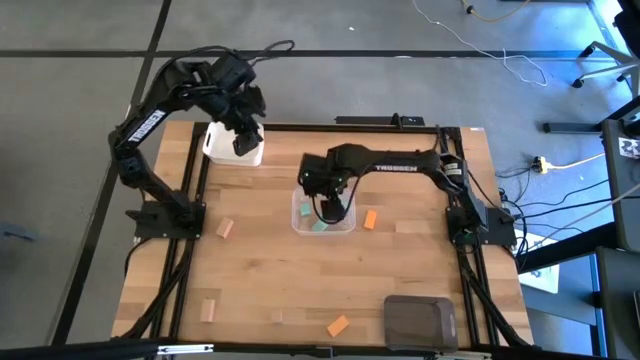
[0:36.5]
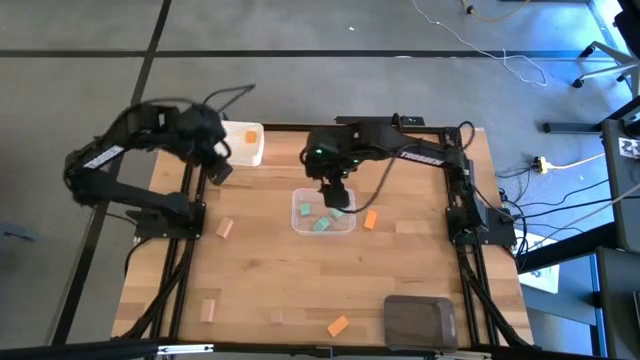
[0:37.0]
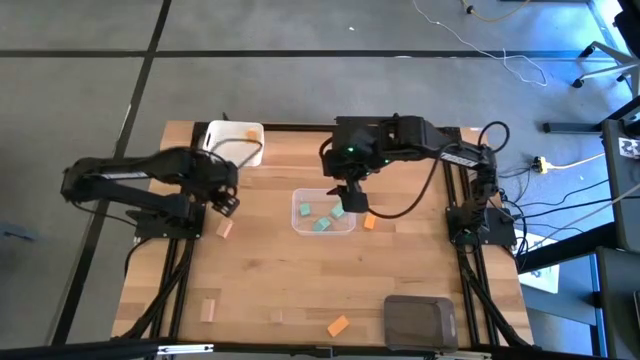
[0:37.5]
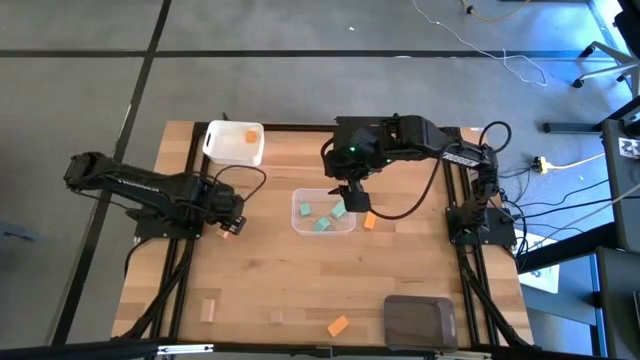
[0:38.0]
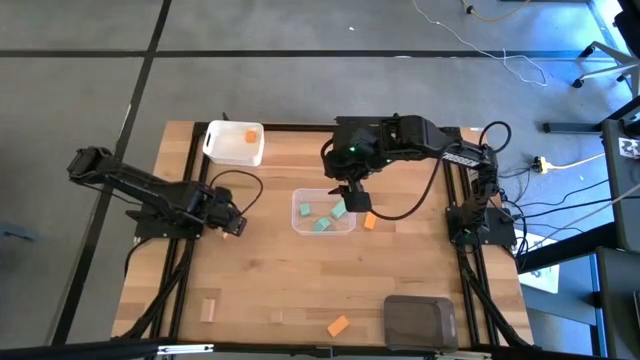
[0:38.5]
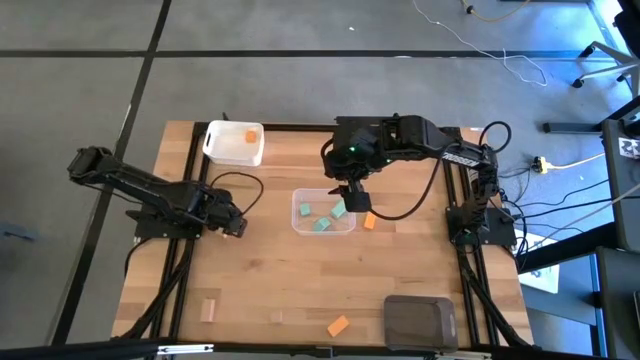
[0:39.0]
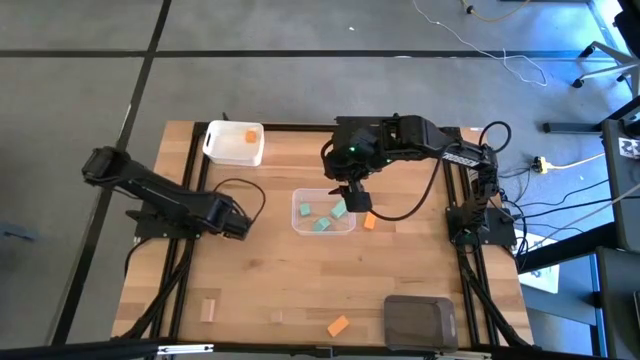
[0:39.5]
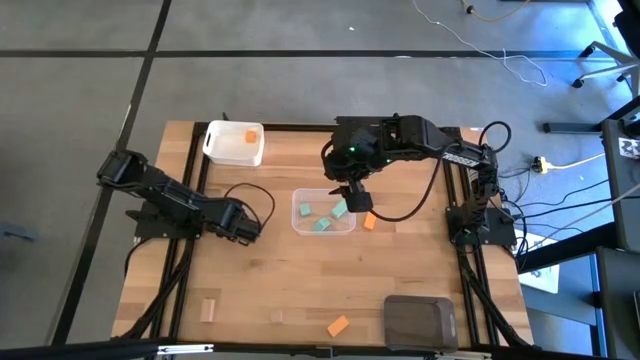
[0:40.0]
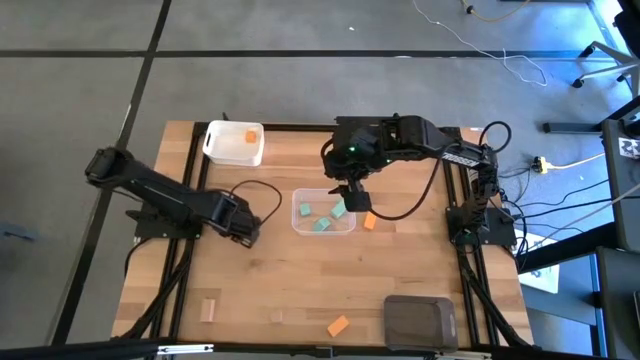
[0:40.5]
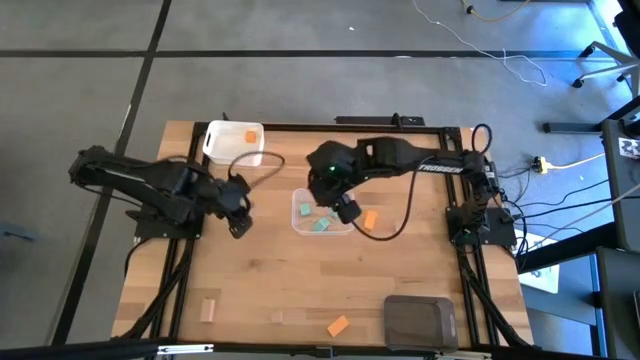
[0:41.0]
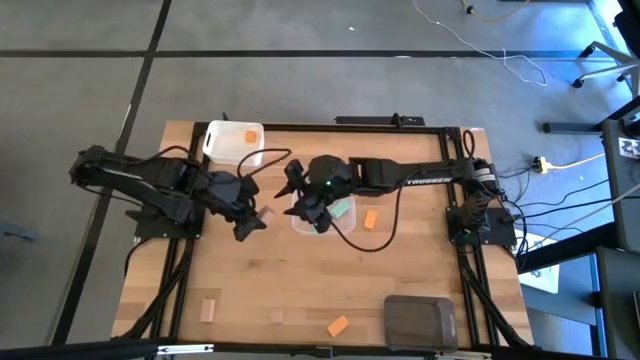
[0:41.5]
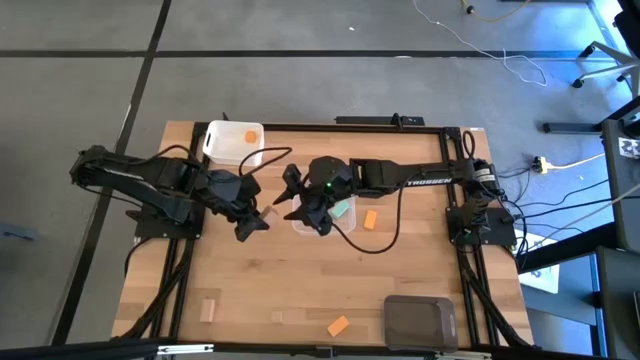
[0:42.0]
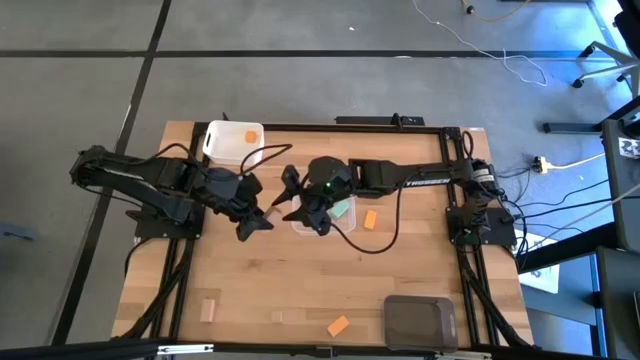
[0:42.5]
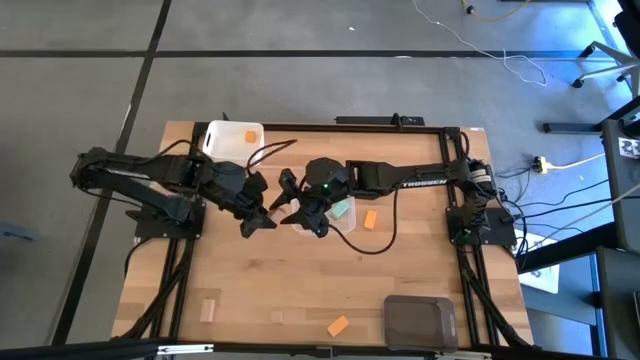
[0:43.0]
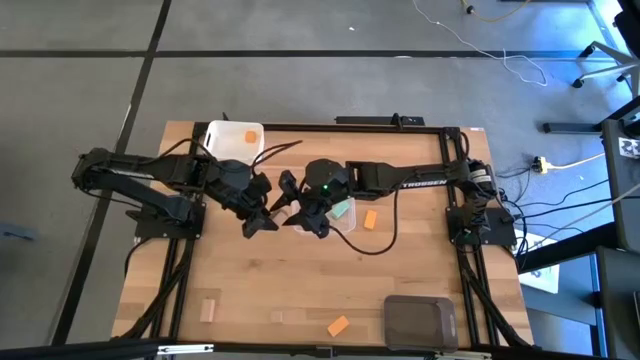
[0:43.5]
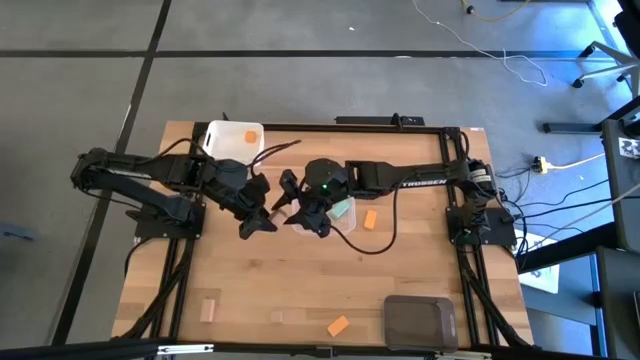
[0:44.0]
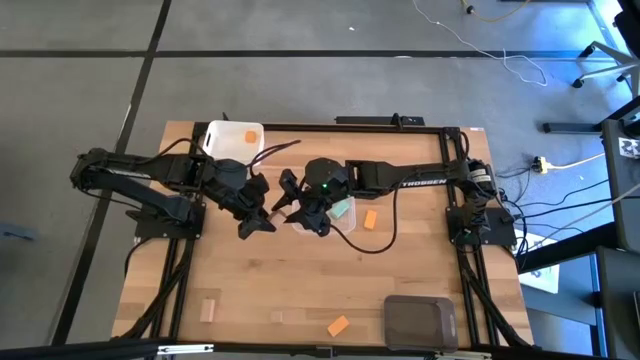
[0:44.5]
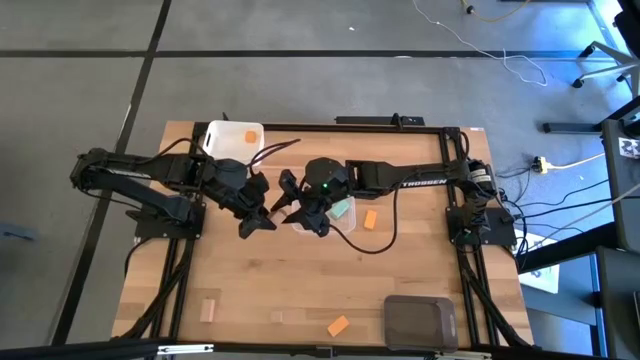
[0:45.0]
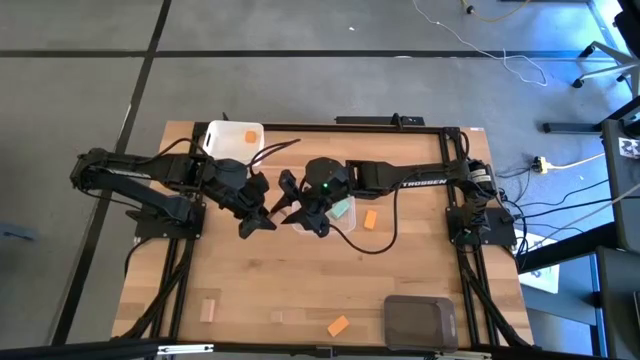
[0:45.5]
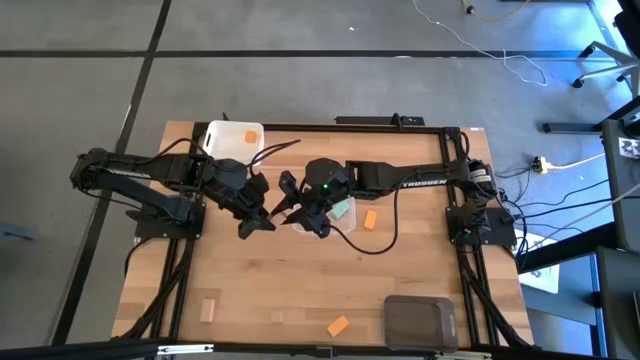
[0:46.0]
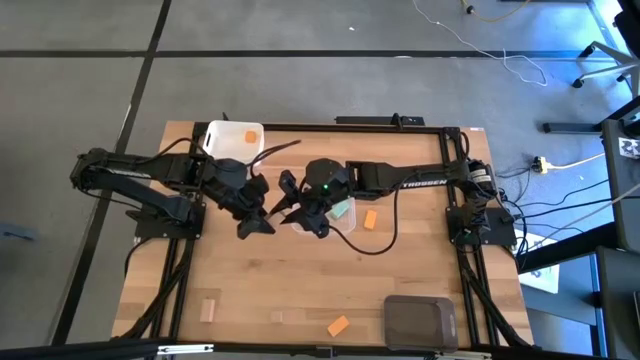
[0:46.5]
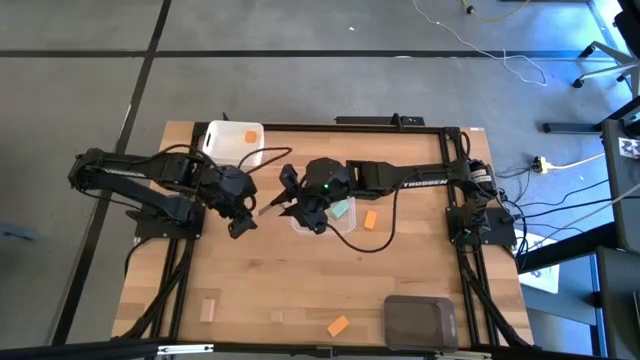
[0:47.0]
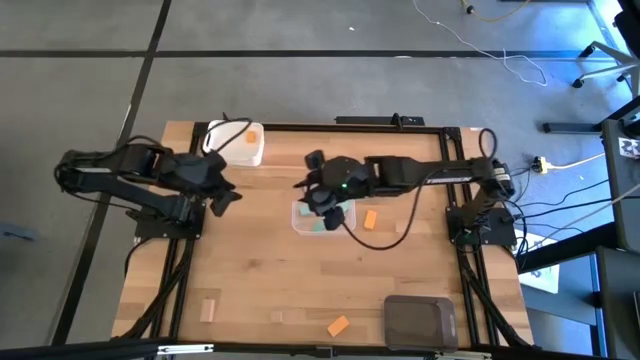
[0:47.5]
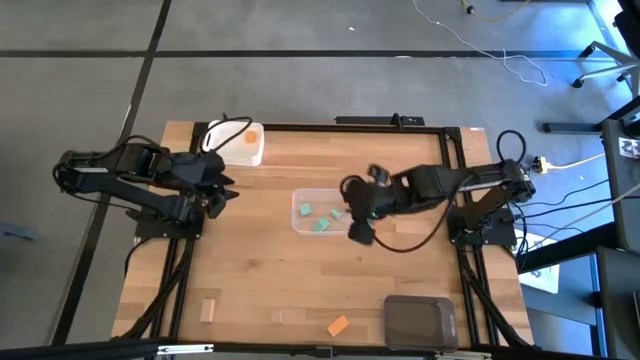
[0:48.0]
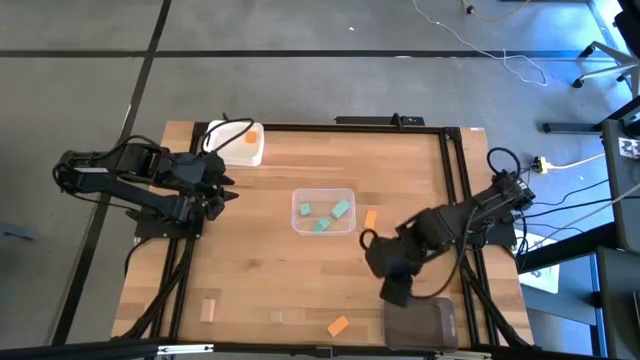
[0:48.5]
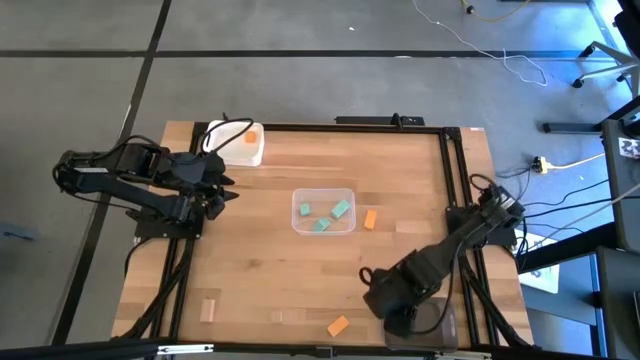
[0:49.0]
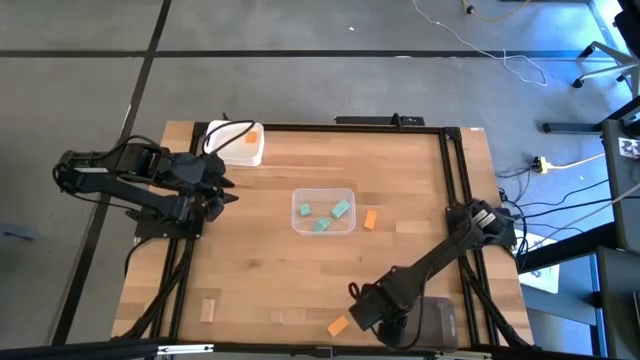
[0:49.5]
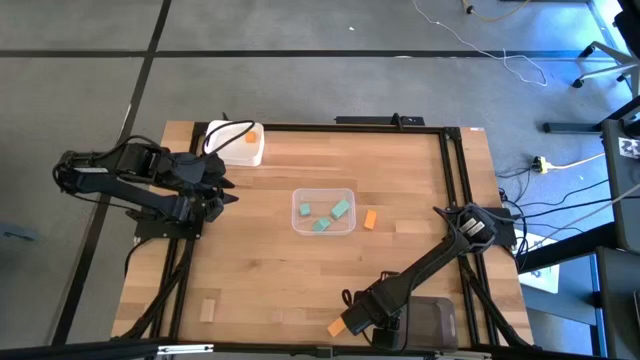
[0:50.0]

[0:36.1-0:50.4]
Task: Sort & place blocks by color
Put the top brown block into the black bin

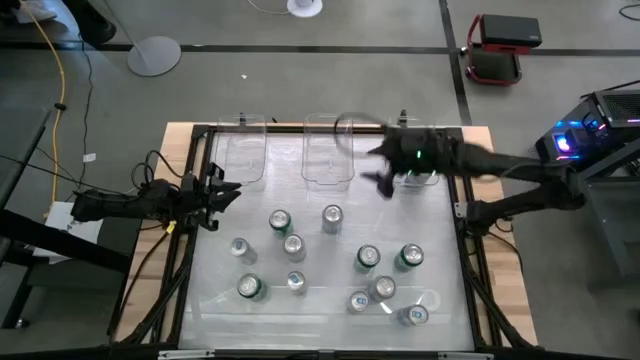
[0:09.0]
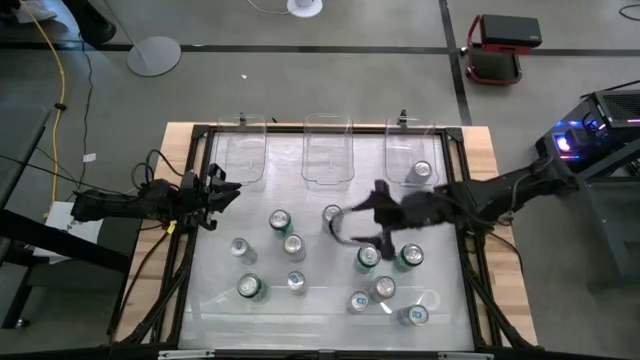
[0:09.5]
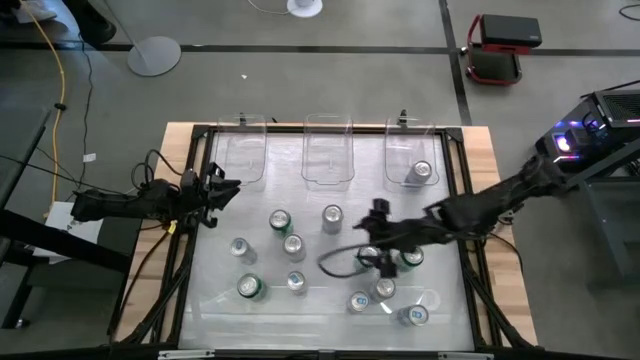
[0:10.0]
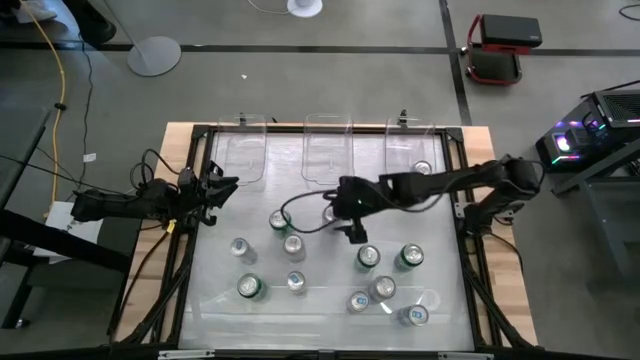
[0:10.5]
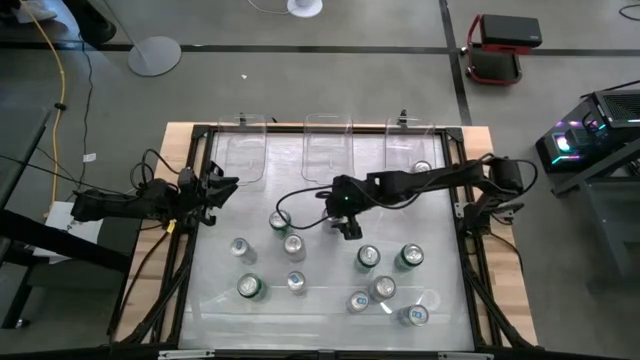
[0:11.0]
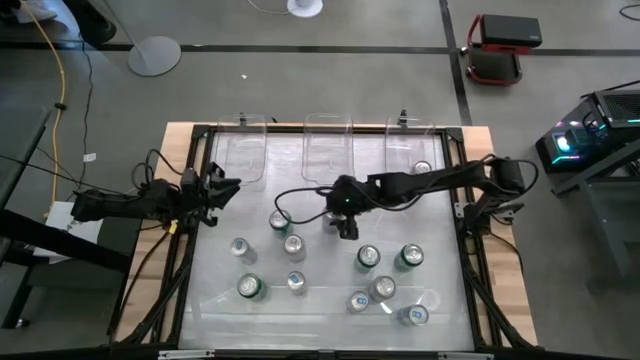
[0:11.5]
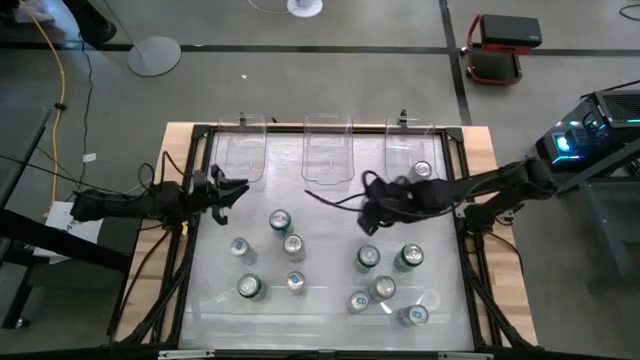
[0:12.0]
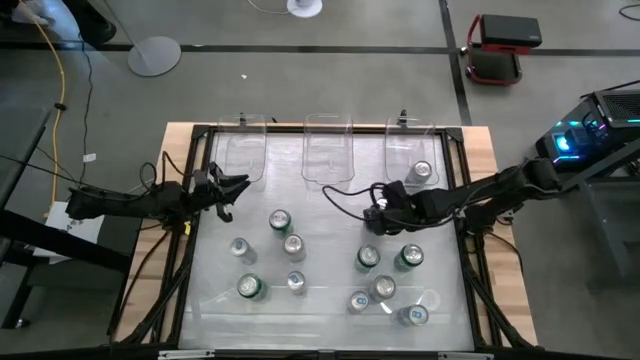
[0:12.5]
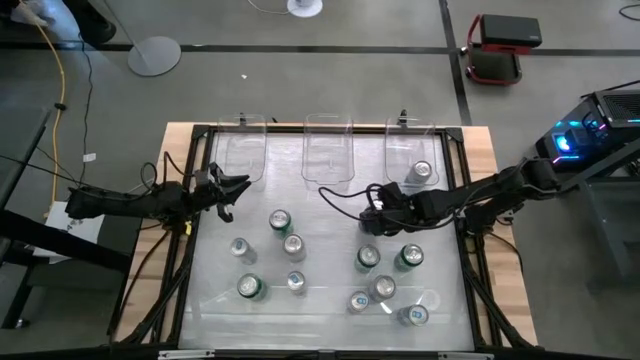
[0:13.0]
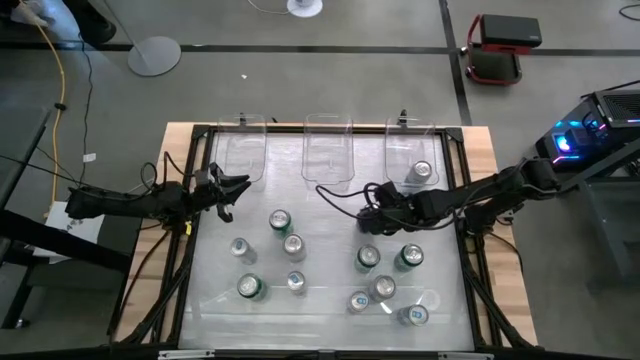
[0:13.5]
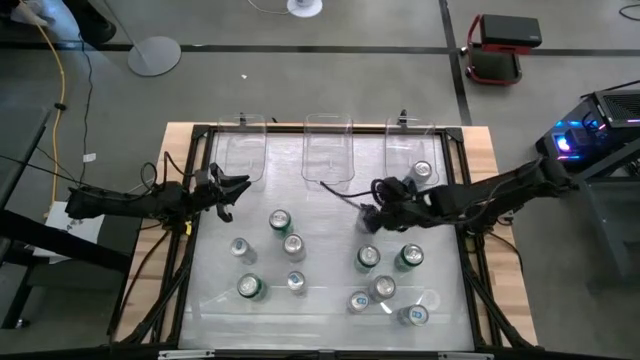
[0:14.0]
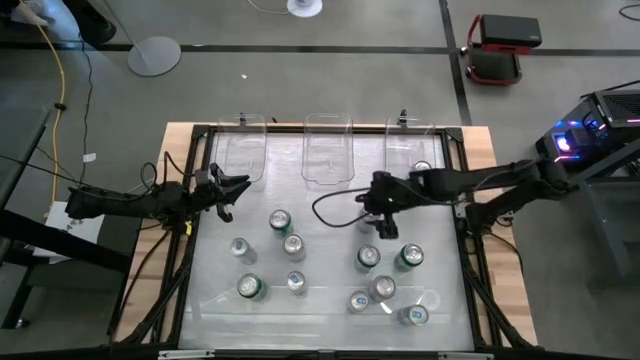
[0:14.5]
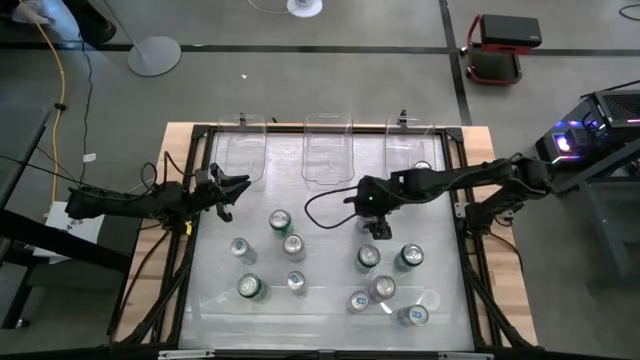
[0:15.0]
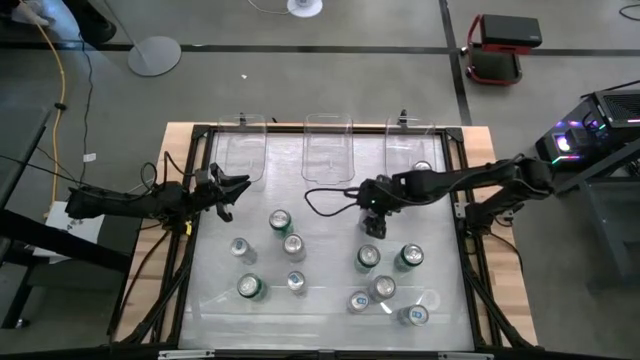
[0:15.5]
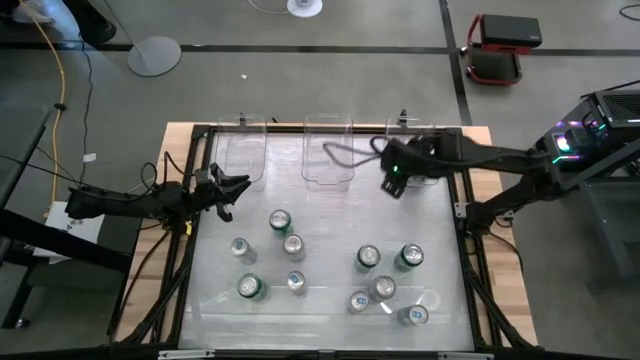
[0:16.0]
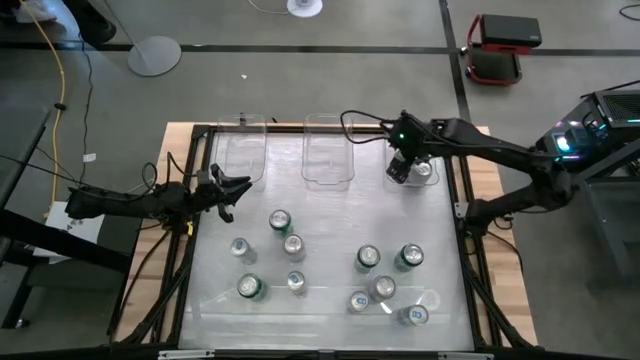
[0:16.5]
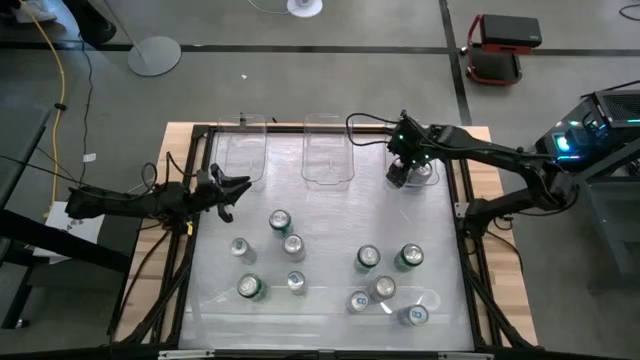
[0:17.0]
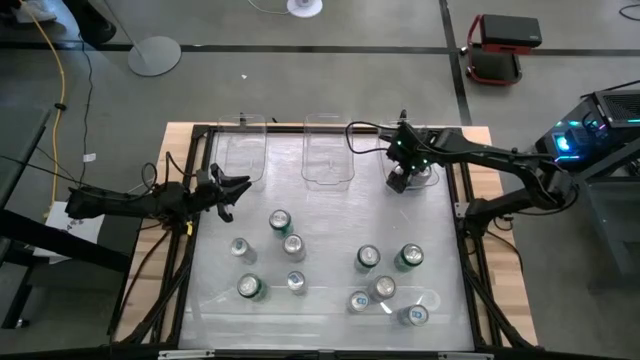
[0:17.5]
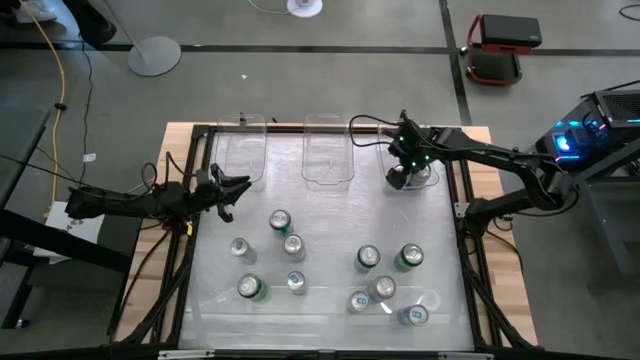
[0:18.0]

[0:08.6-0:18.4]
Task: Sort soda cans
Put the top blue-white soda can into the right transparent bin
